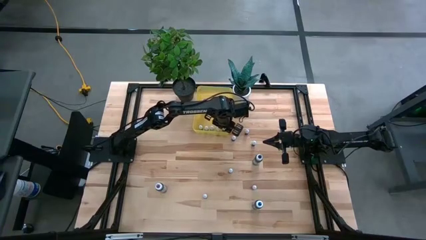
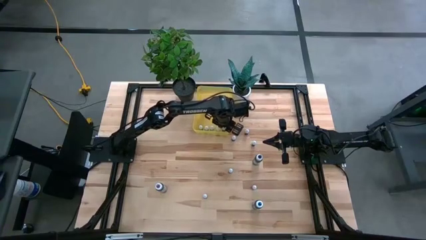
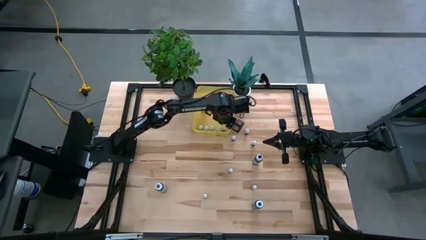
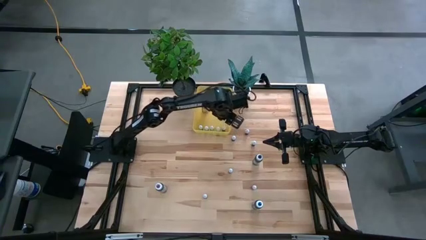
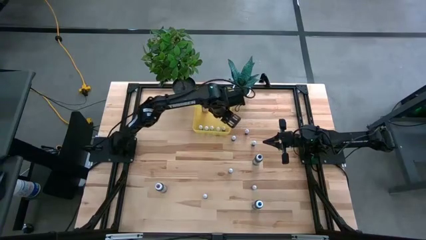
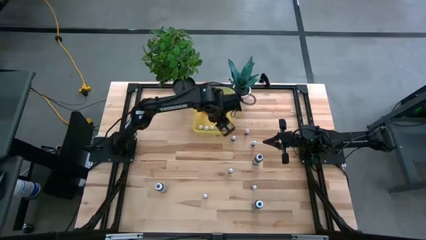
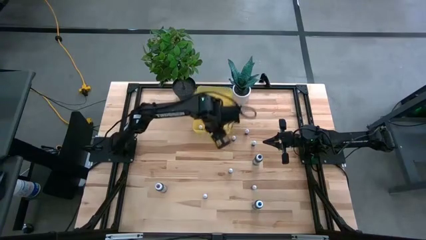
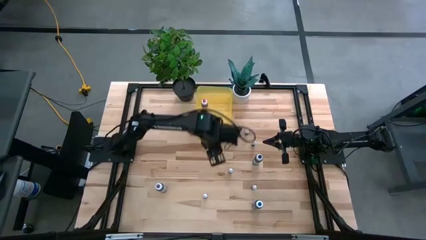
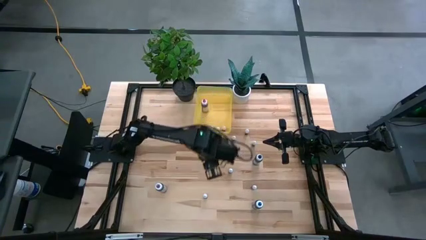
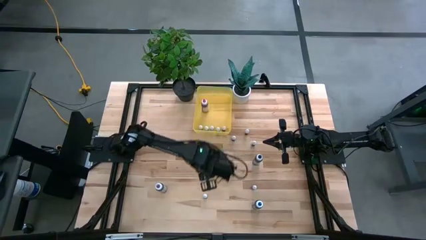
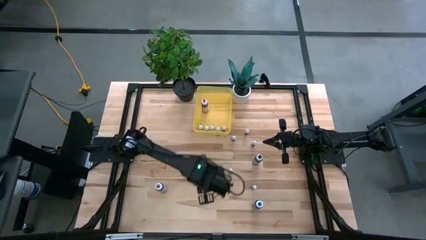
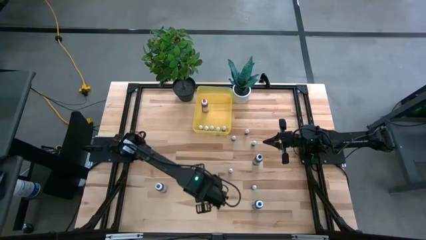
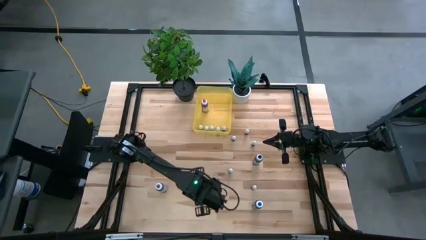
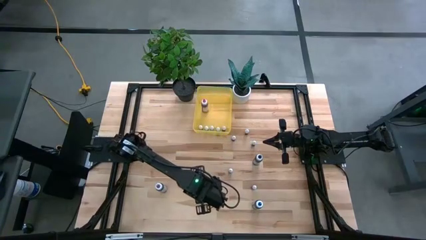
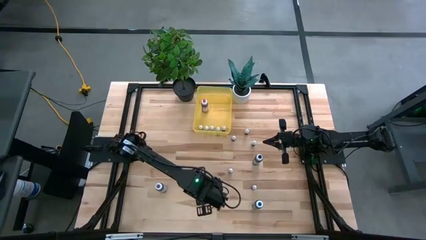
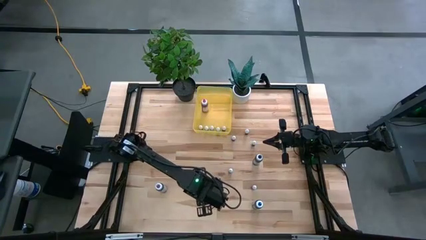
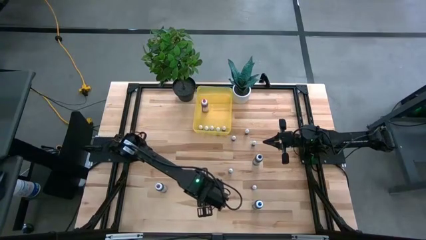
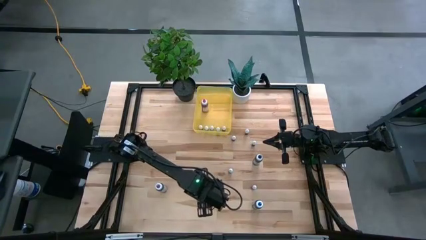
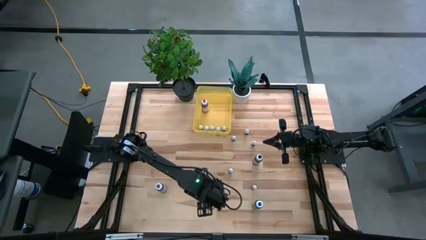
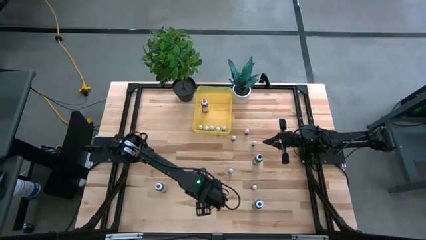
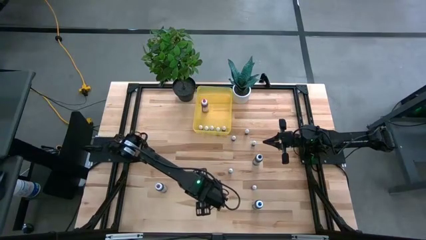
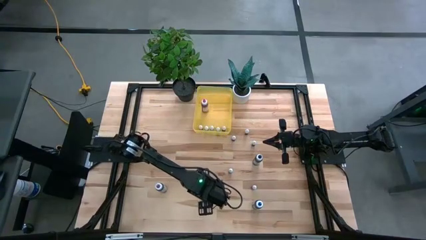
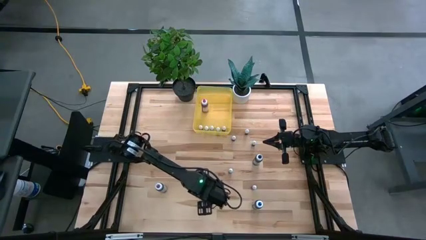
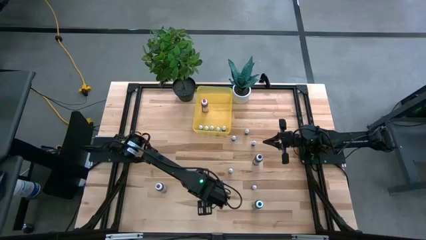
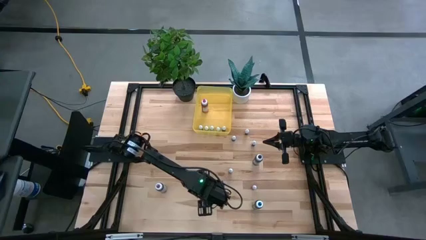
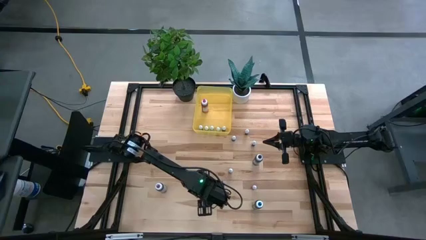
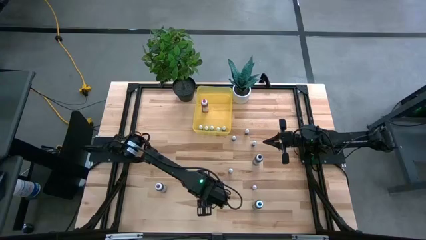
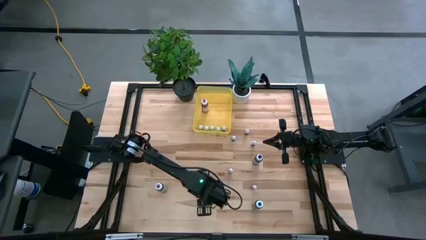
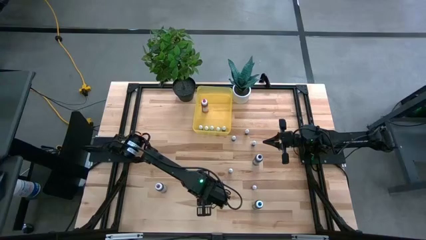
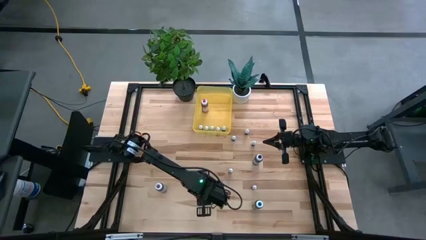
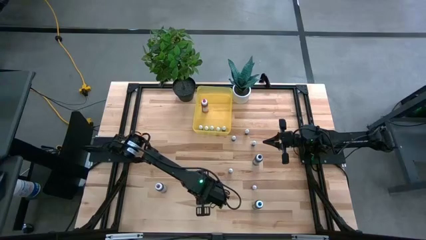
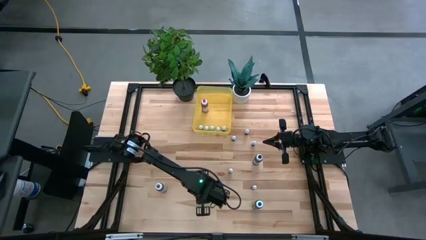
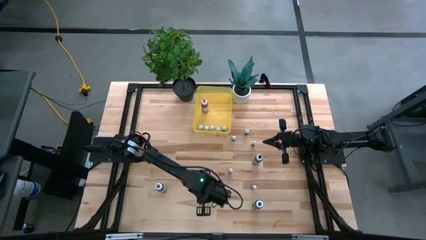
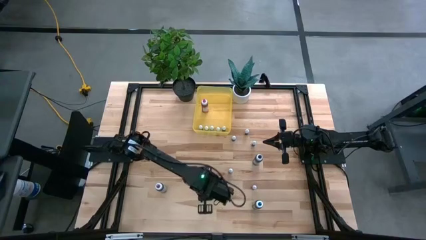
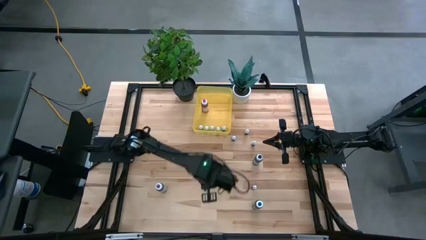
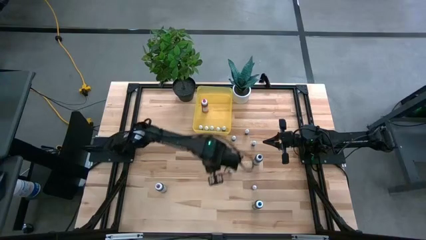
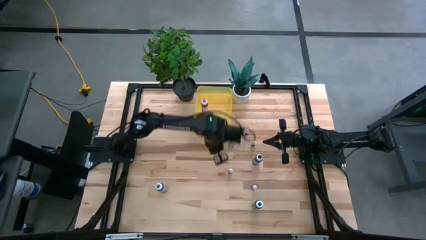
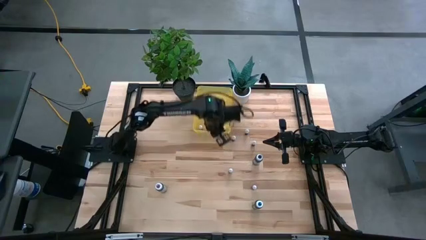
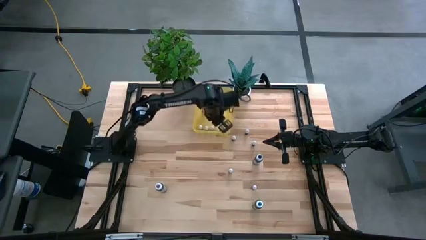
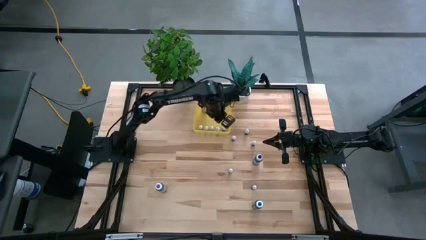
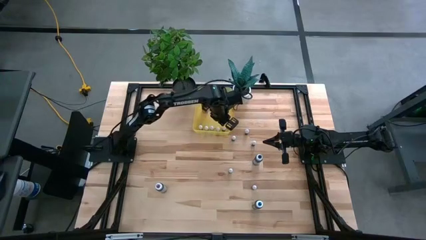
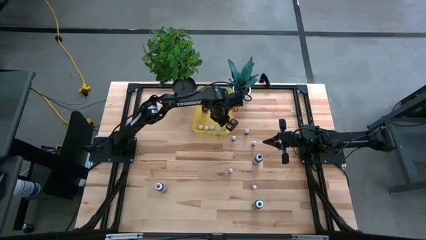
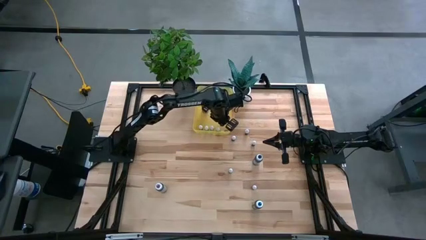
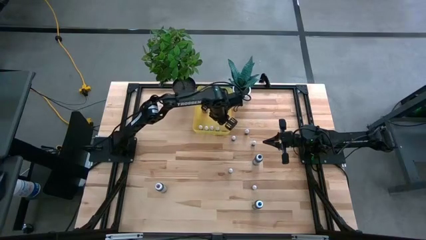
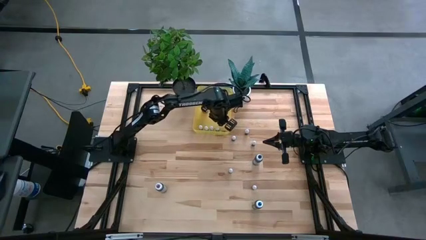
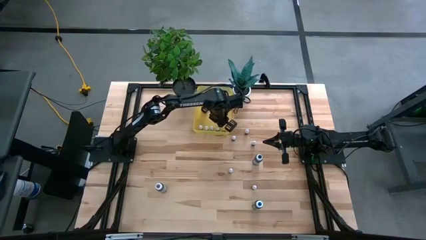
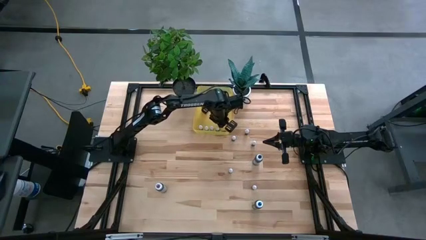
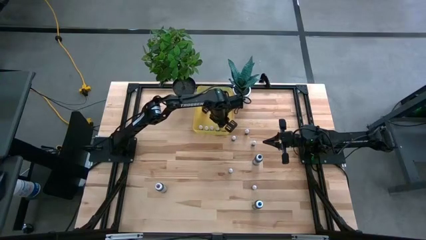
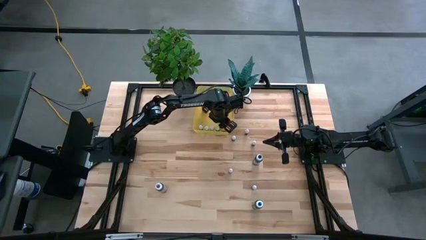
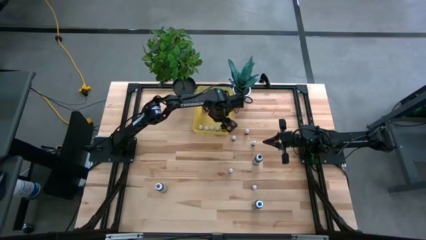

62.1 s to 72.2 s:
Task: Pick & Place food coloring
Put the small black food coloring bottle into the yellow bin

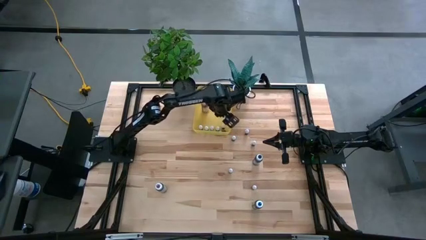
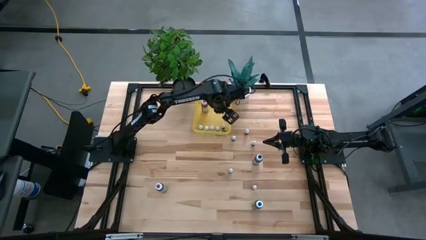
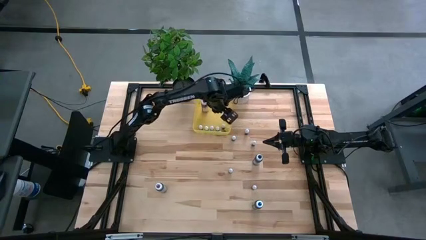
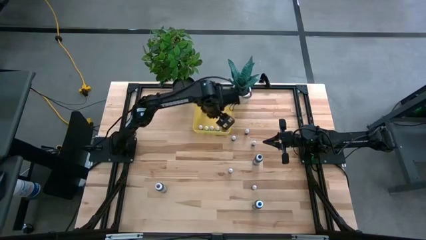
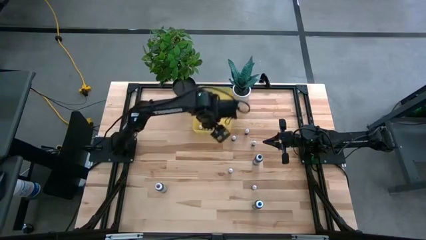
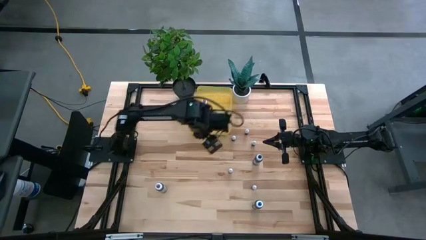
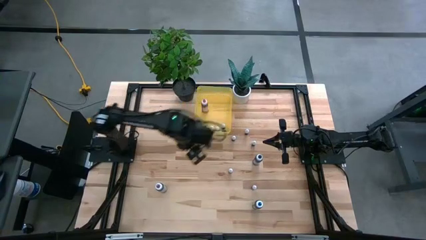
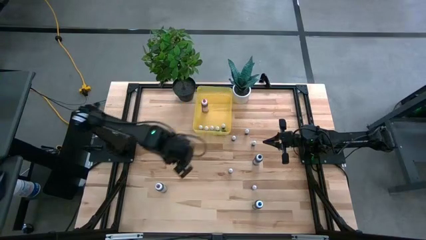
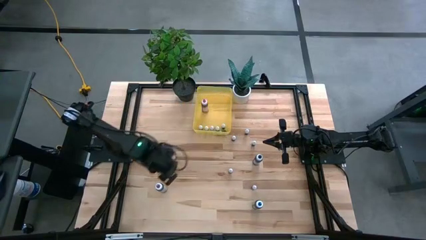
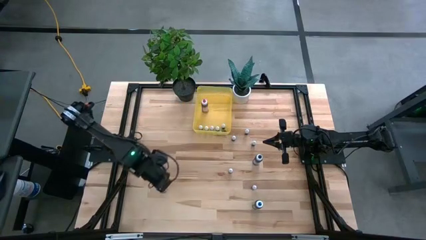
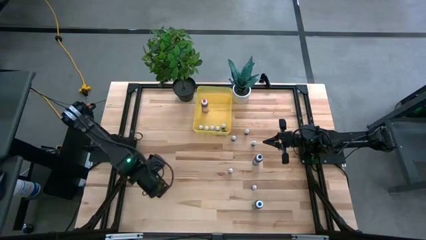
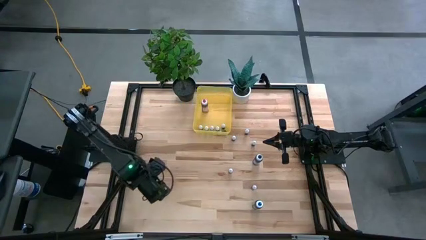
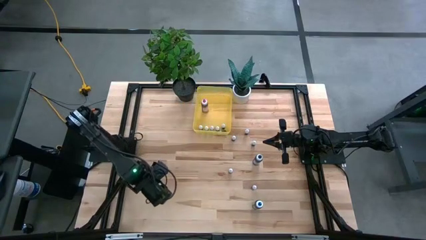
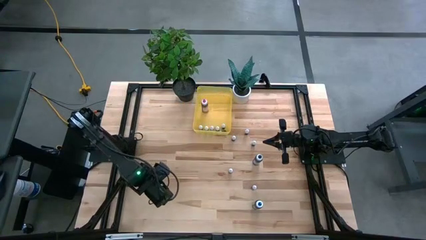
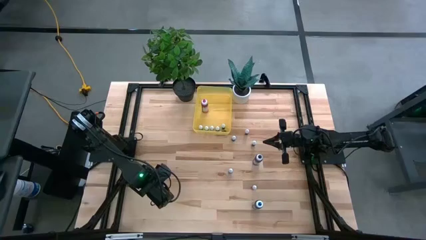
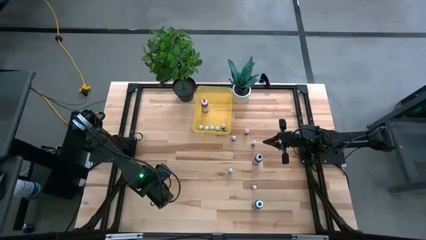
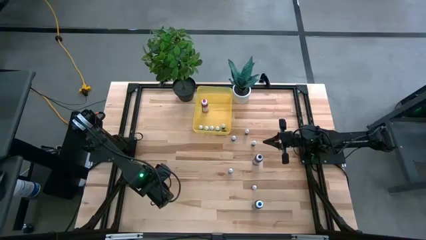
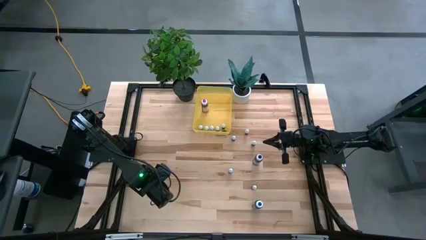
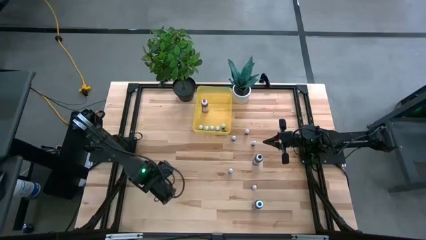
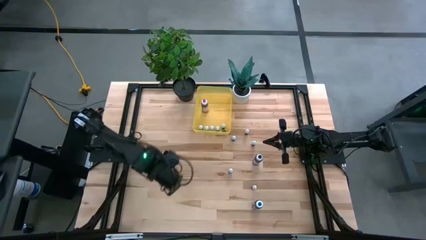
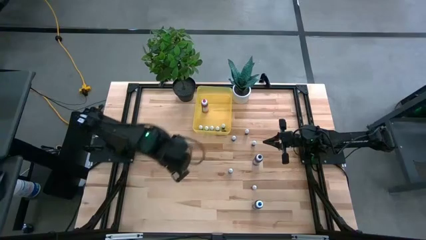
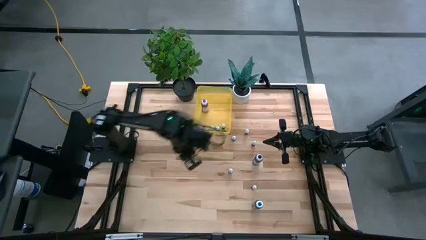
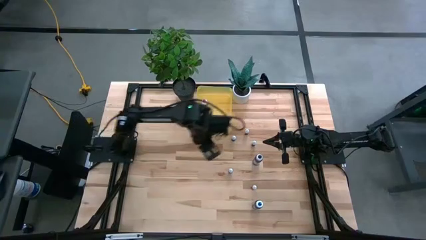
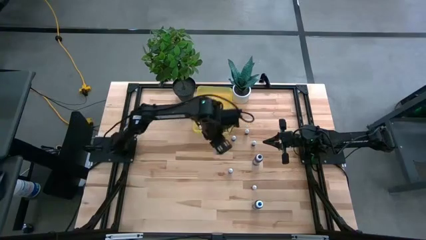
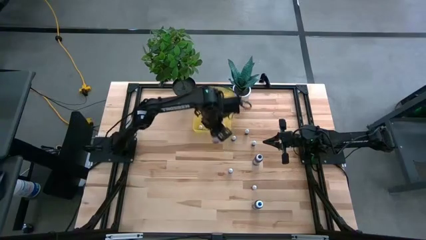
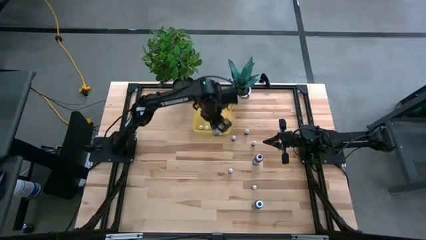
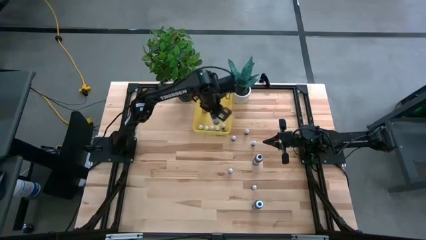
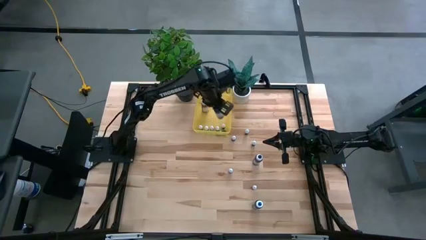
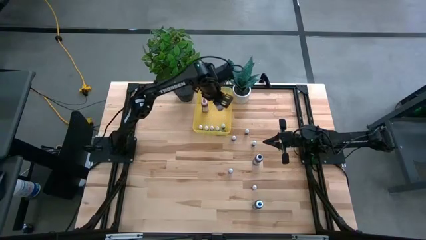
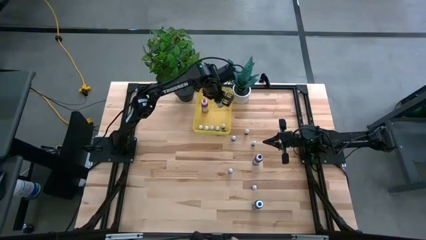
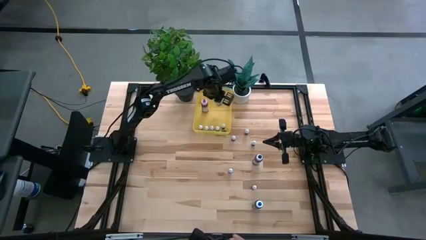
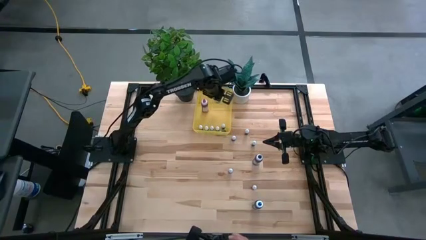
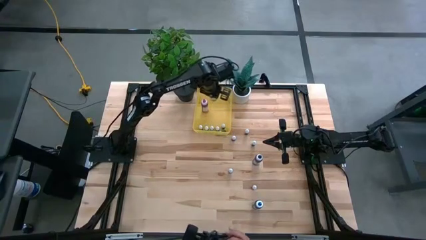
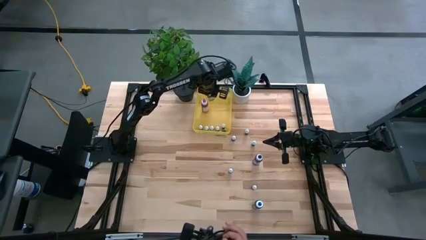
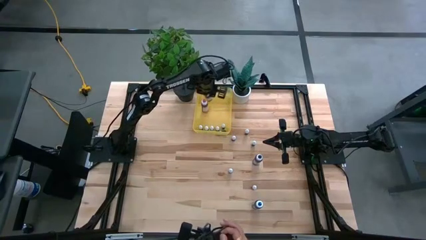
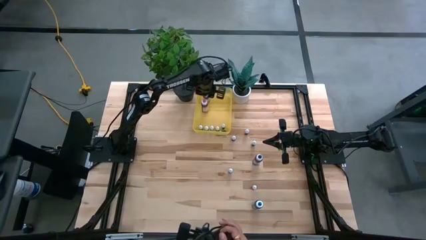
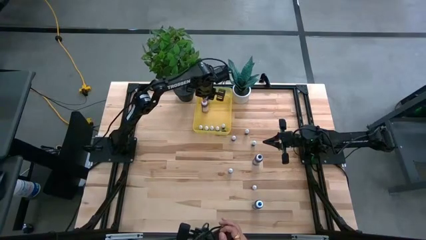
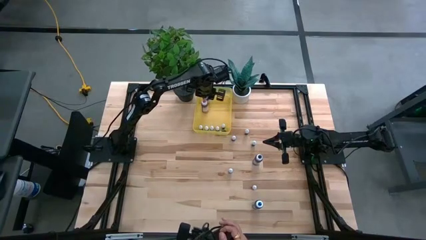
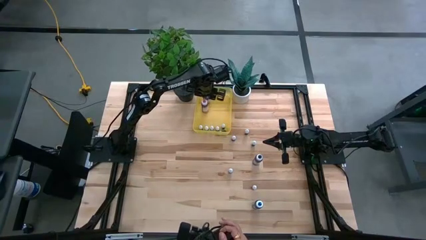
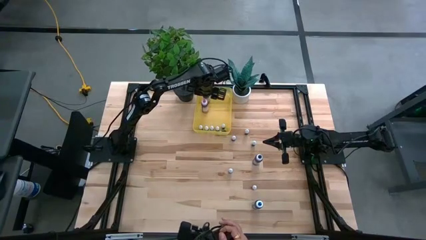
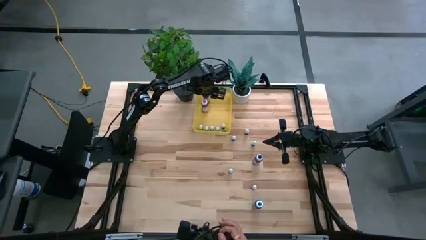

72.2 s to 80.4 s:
Put the large purple food coloring bottle into the yellow bin
